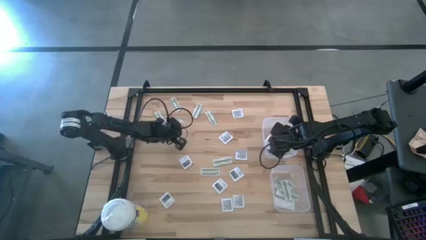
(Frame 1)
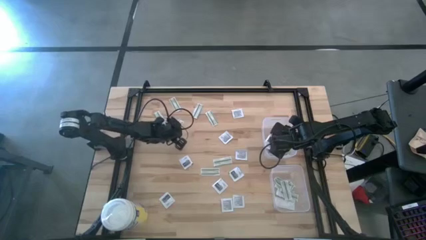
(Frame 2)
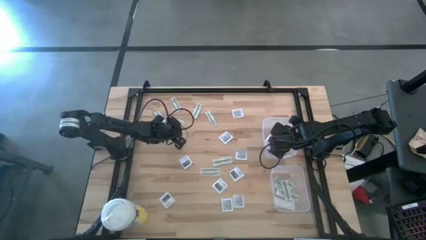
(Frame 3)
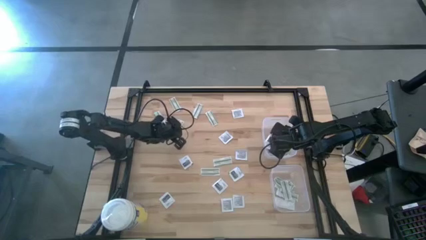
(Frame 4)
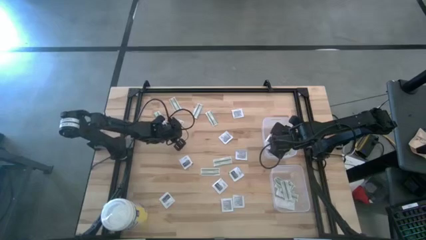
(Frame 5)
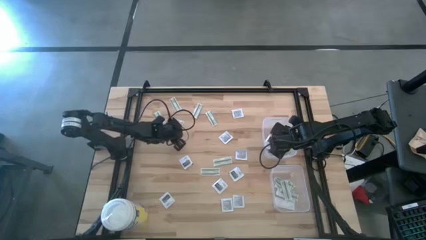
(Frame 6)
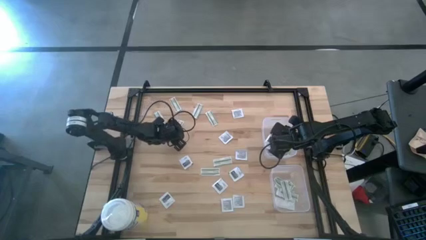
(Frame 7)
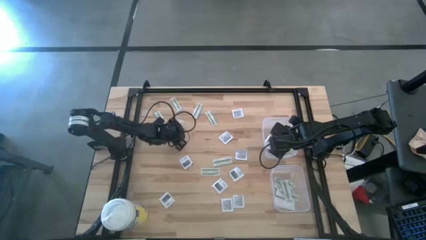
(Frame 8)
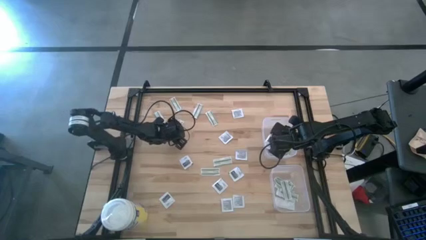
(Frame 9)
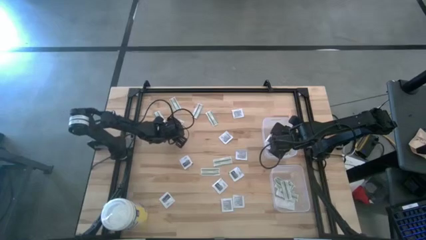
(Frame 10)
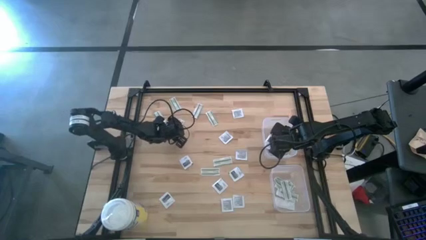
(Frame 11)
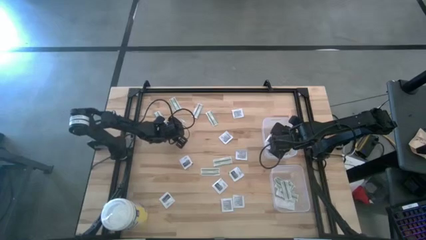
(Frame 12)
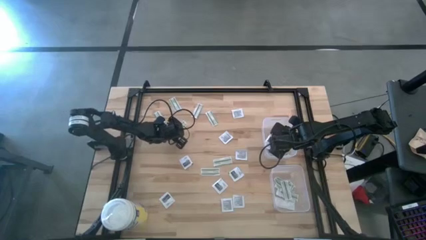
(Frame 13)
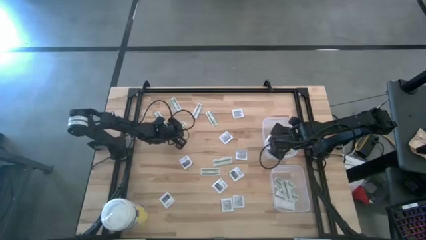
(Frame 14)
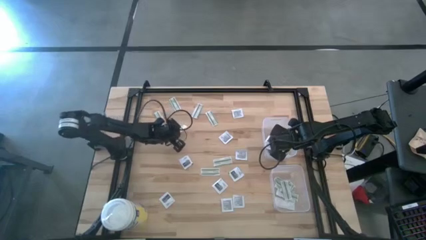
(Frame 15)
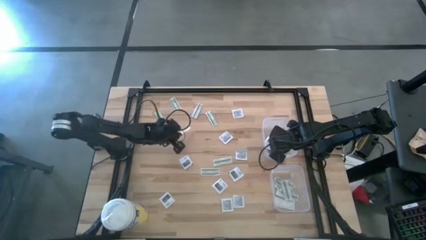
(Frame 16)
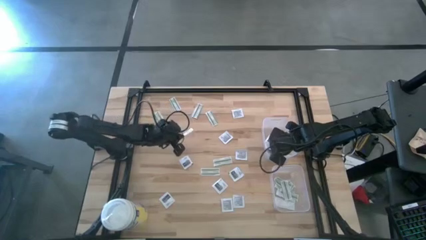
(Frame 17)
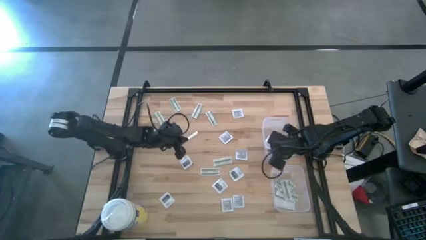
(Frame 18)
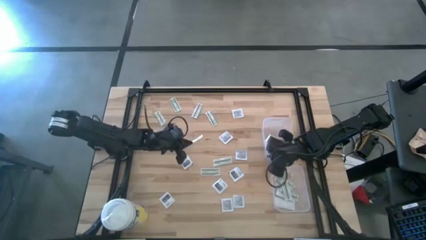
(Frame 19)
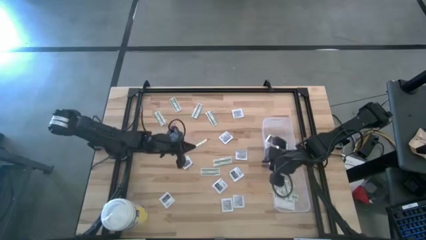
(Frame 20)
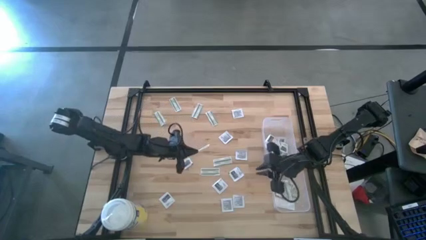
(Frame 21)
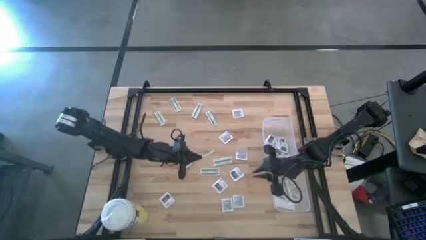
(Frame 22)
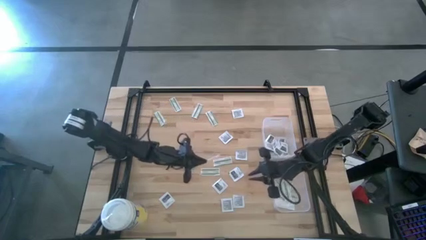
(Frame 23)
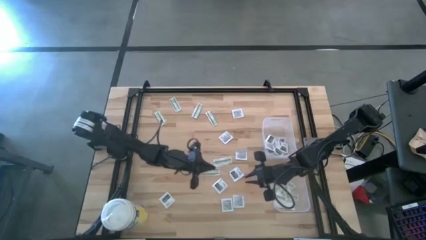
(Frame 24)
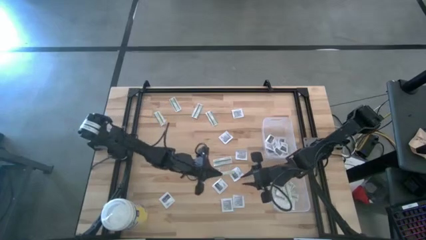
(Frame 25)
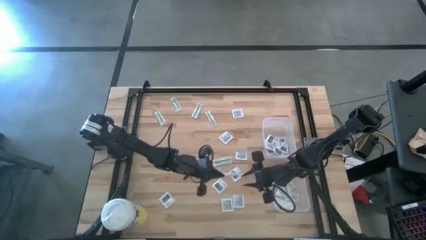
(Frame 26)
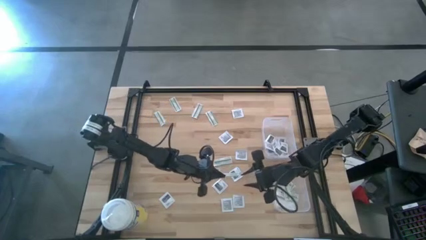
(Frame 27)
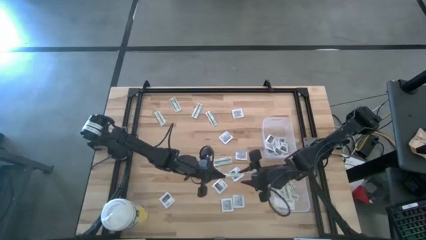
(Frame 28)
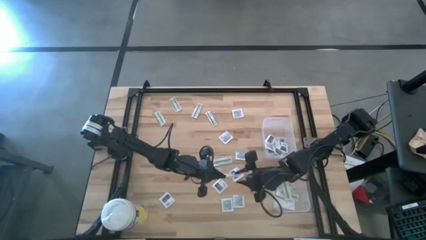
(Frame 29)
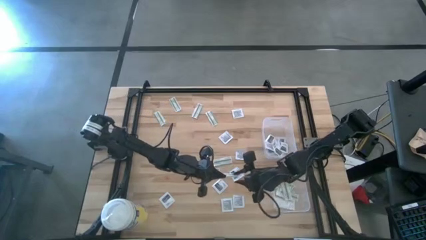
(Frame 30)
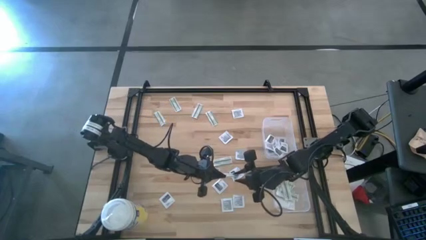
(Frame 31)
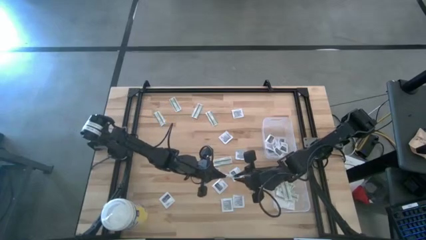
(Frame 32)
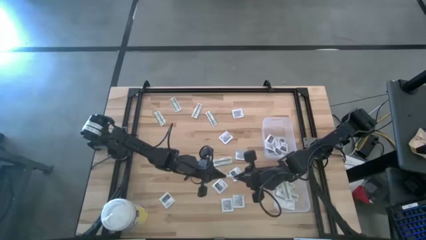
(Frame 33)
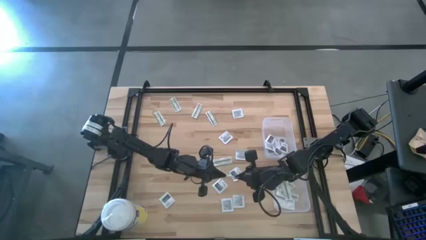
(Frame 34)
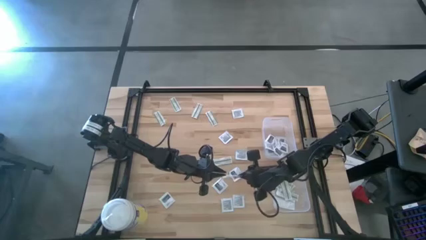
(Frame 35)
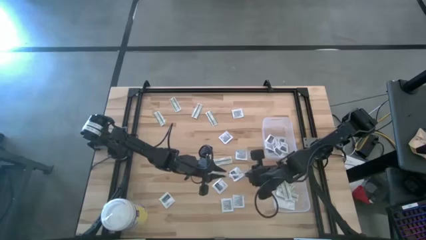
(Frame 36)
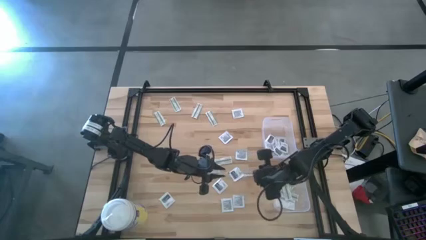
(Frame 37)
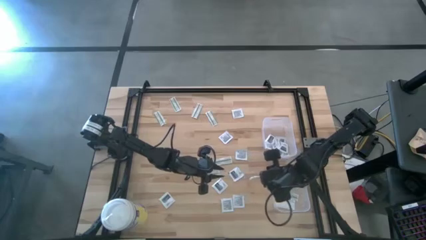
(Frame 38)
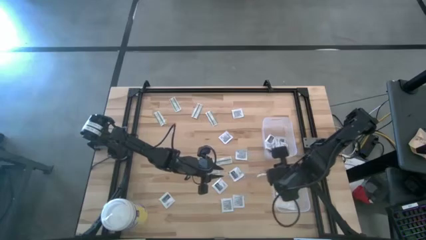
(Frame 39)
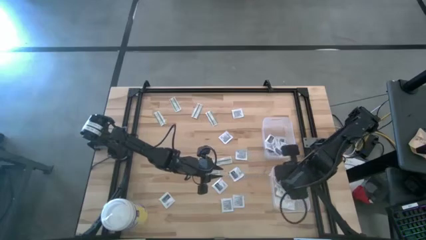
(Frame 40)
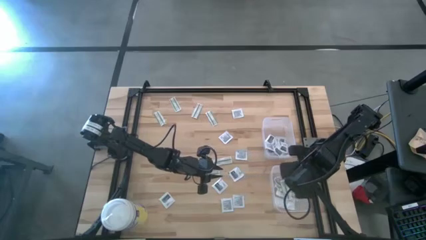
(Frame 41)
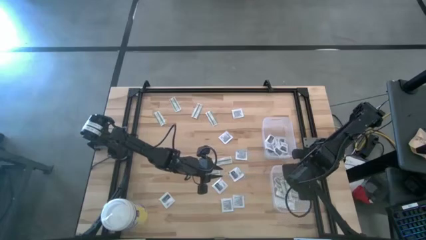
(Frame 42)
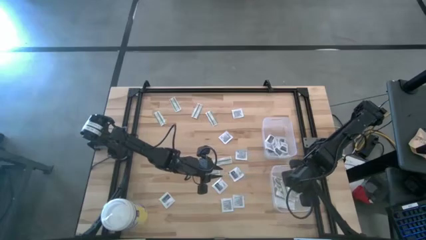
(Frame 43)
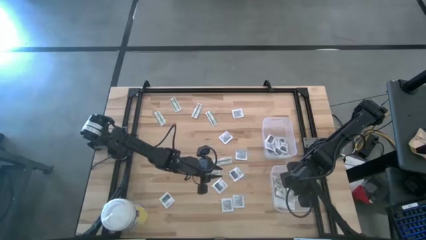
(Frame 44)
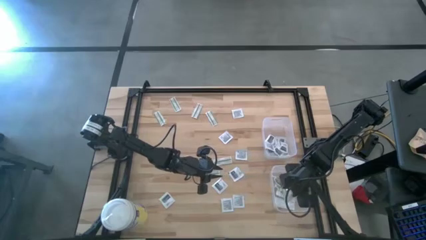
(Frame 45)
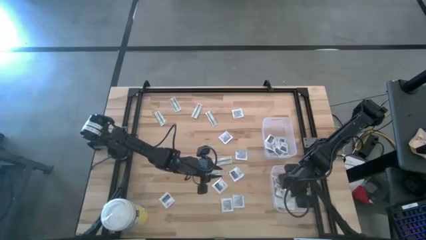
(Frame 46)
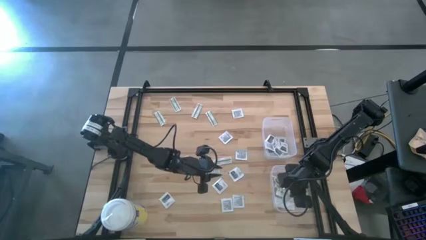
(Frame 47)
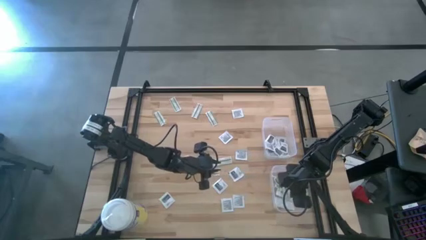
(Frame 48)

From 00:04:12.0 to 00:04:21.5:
Task: Pick & Place First Aid Supplies
Put the bandage pack into the bottom bin

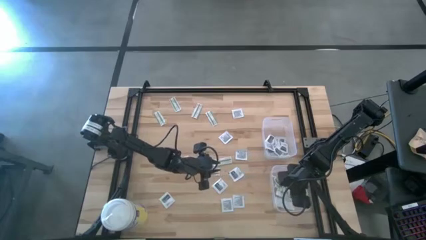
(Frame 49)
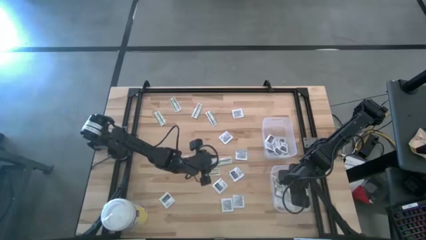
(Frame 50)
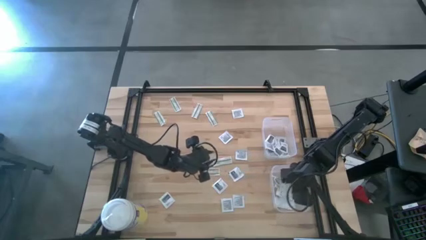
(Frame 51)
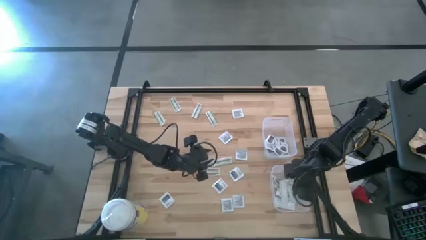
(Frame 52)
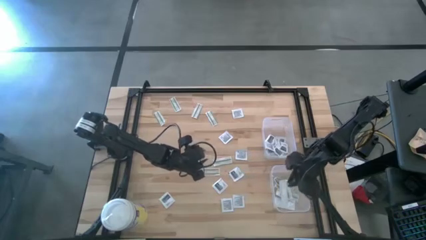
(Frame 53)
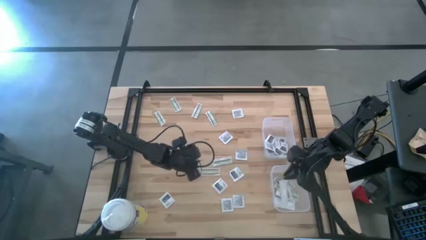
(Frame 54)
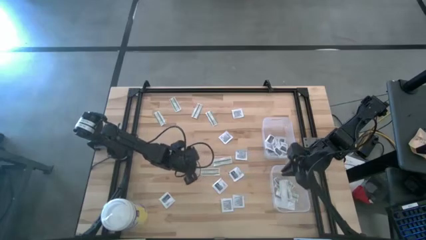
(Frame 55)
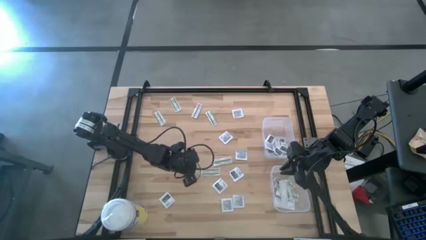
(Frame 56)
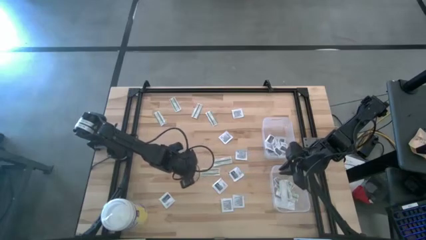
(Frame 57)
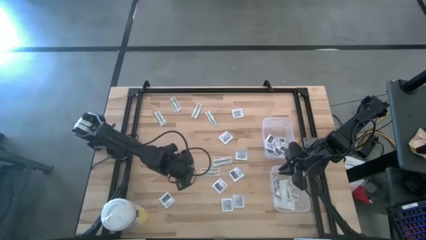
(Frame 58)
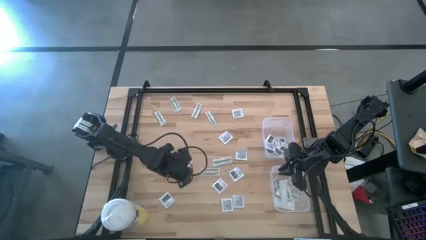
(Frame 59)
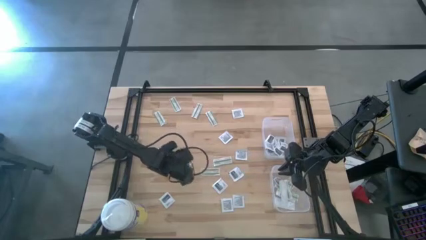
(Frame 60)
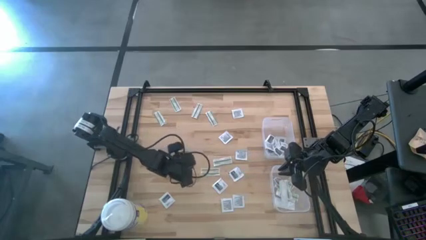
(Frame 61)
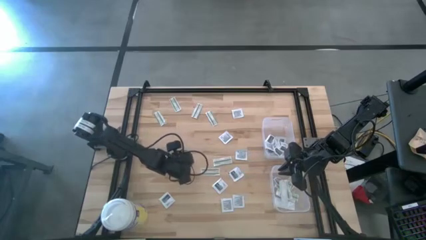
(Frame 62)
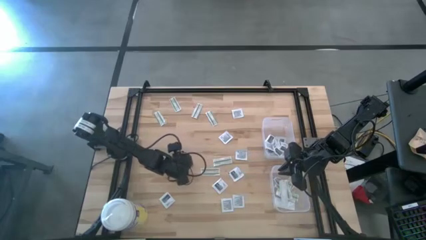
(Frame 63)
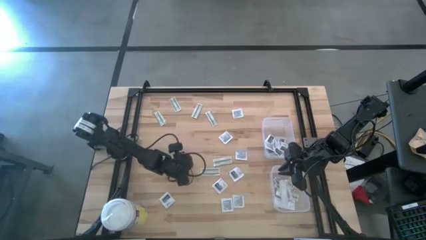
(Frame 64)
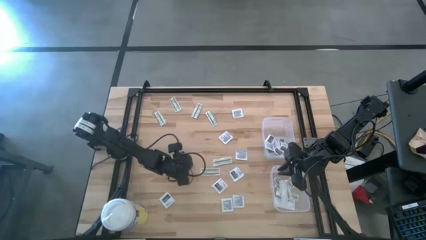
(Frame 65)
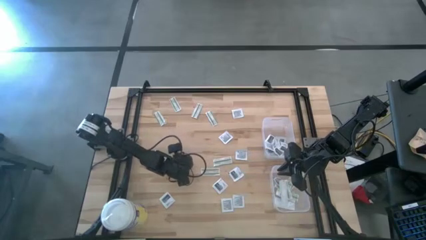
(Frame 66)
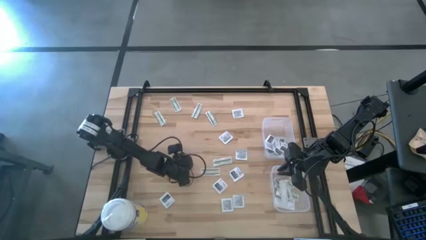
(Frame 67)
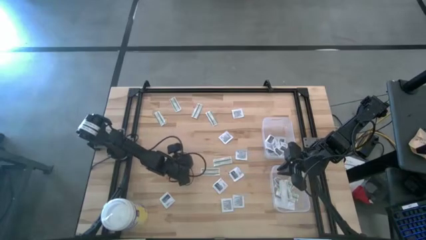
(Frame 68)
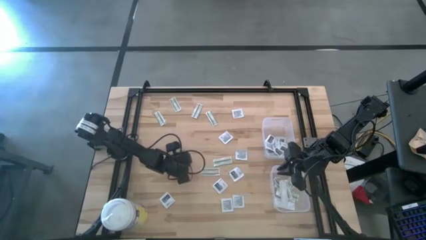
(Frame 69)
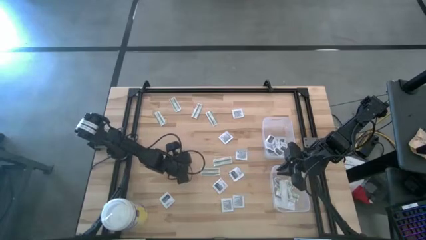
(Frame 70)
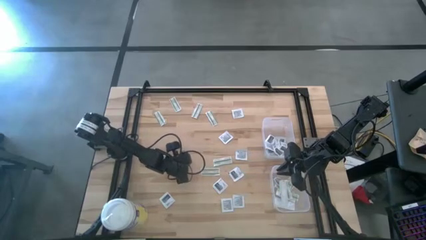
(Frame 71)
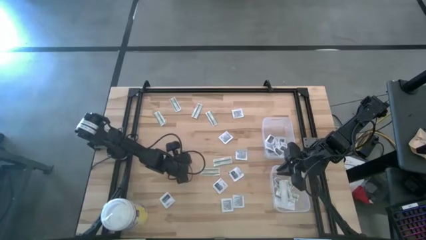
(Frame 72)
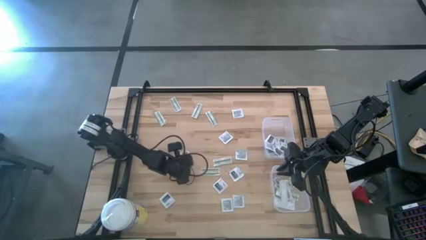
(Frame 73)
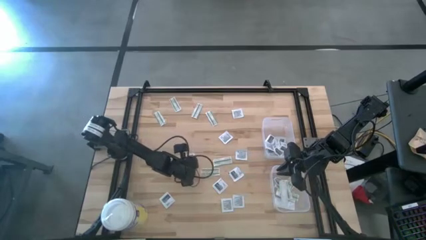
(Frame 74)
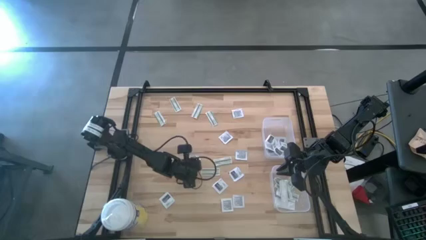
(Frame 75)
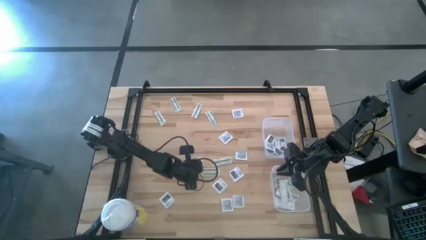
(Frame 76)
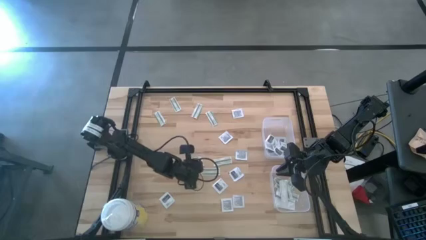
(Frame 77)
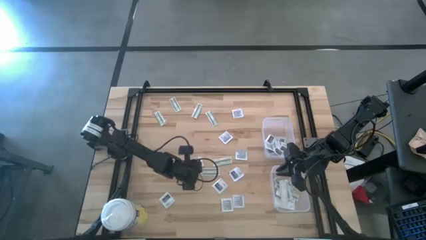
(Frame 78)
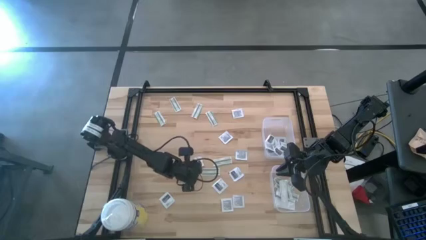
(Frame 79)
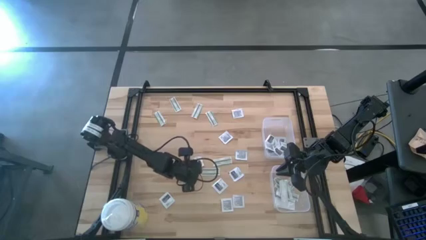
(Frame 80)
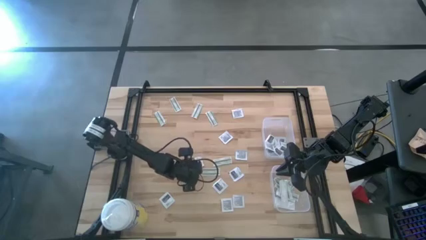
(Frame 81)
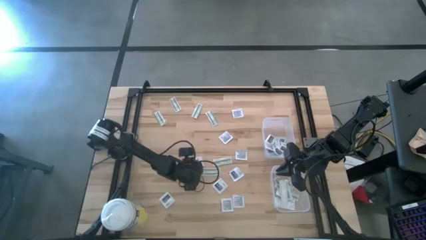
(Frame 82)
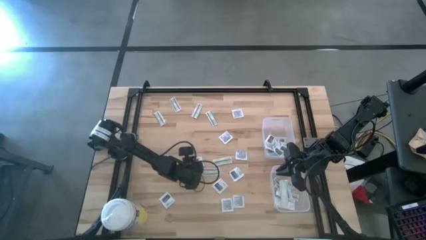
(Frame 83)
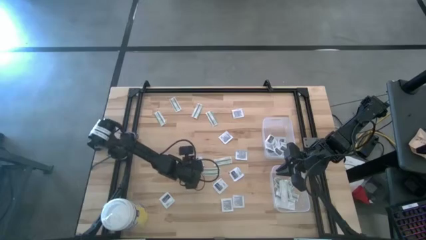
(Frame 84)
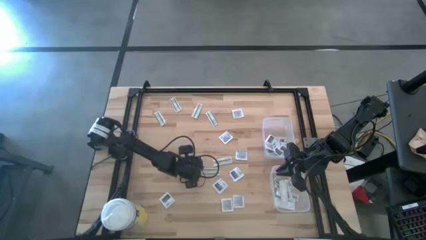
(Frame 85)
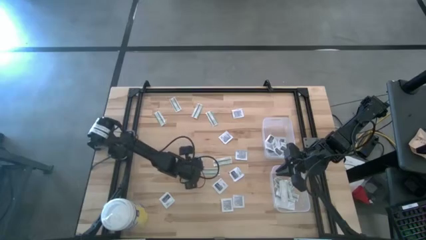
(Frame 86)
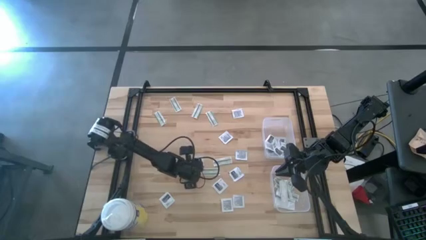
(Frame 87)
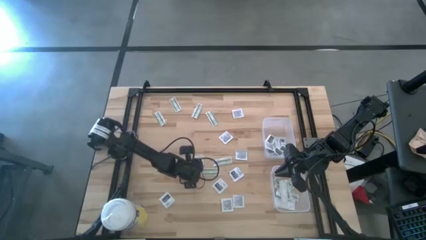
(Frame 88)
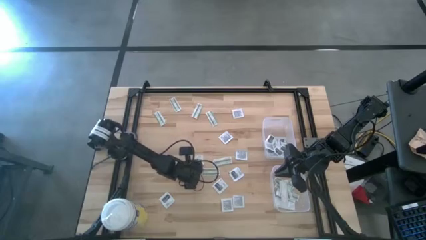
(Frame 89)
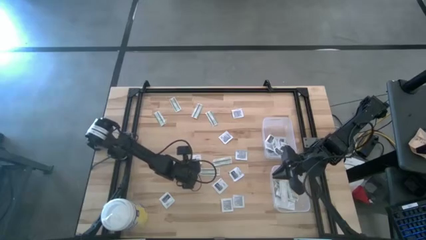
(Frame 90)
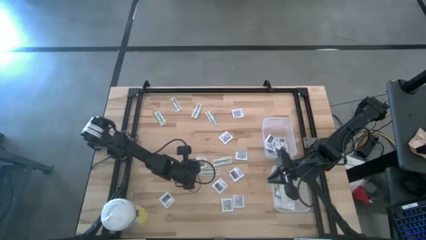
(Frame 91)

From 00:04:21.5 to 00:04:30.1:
Put the towelette pack into the top bin
